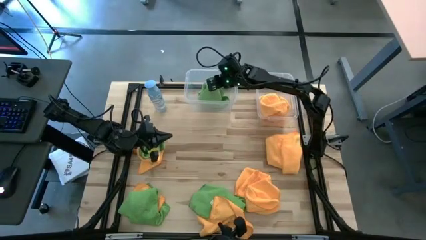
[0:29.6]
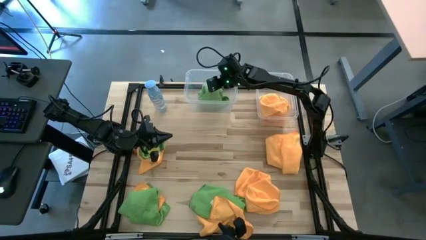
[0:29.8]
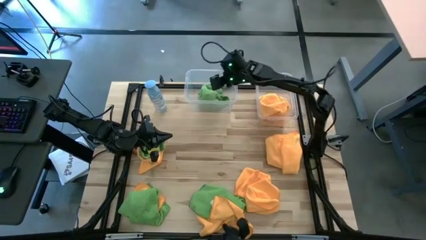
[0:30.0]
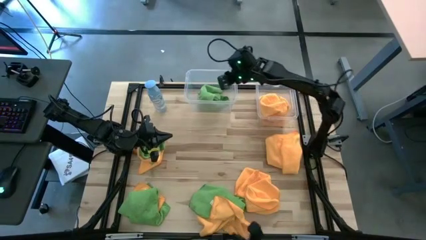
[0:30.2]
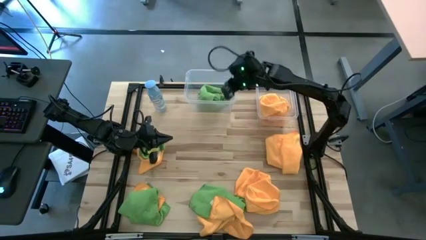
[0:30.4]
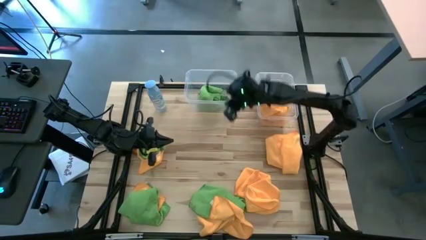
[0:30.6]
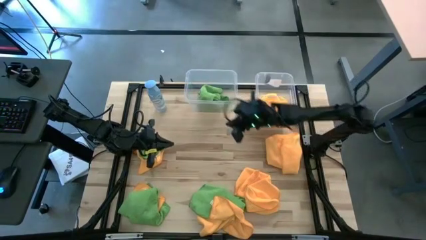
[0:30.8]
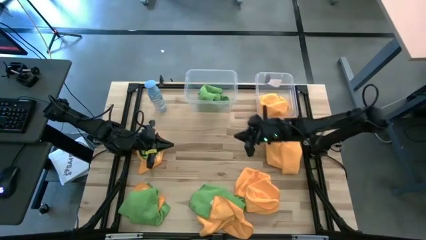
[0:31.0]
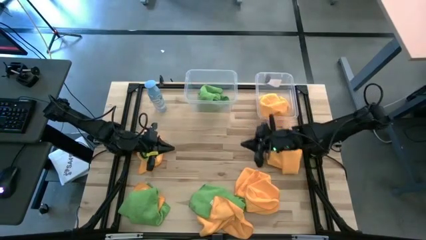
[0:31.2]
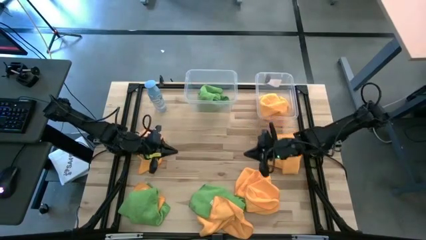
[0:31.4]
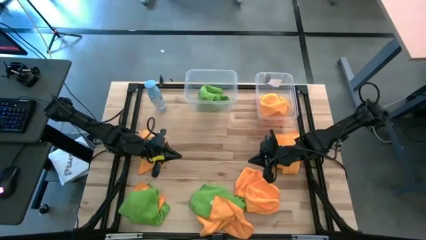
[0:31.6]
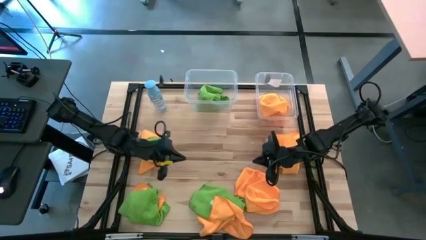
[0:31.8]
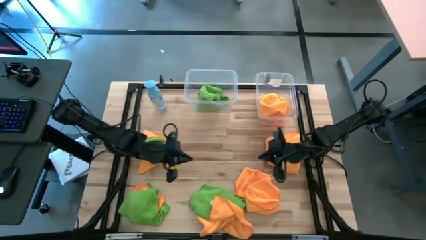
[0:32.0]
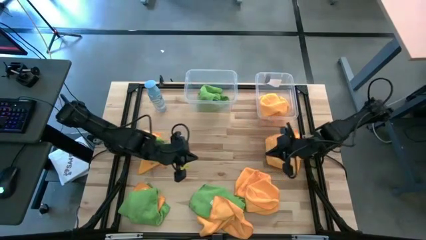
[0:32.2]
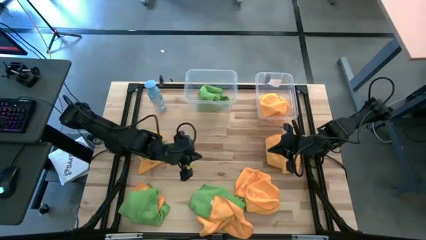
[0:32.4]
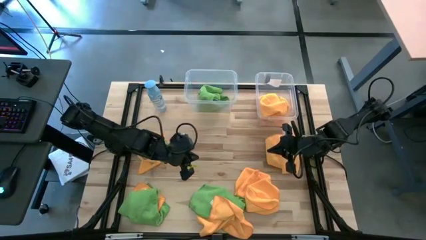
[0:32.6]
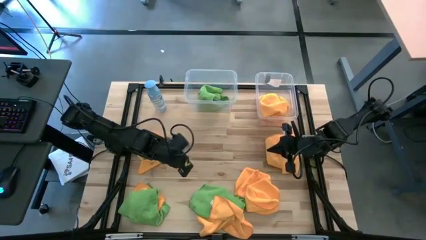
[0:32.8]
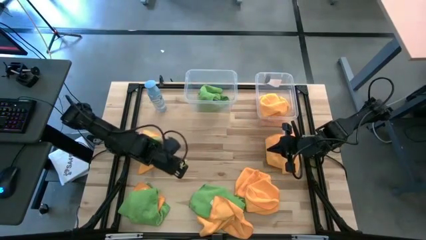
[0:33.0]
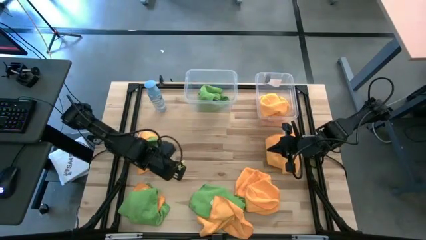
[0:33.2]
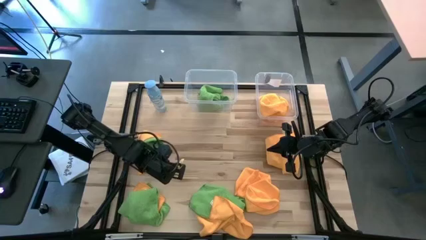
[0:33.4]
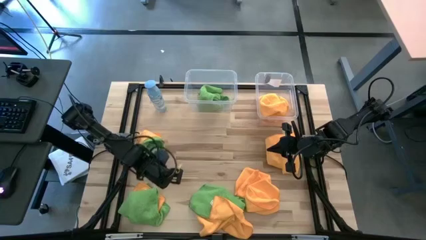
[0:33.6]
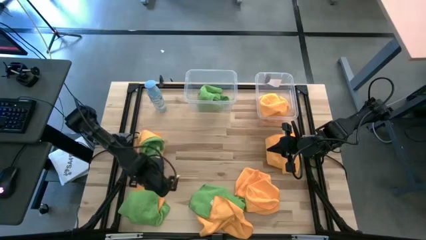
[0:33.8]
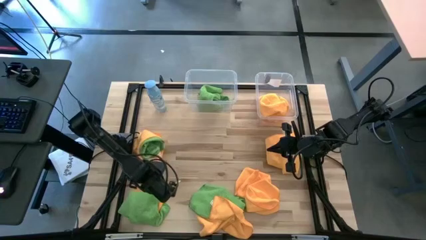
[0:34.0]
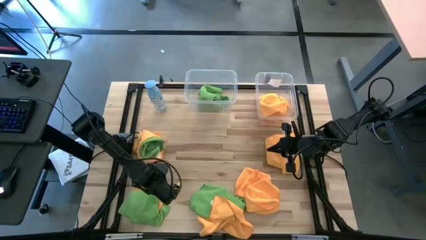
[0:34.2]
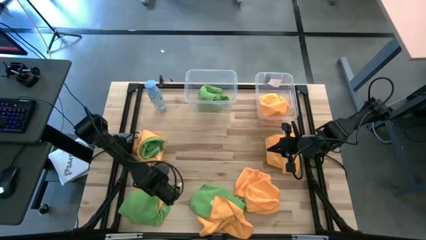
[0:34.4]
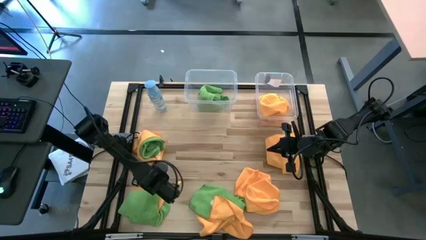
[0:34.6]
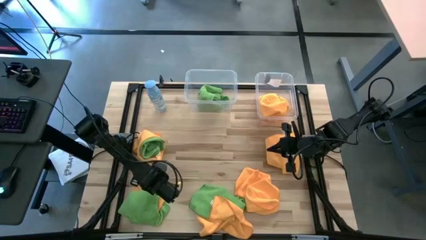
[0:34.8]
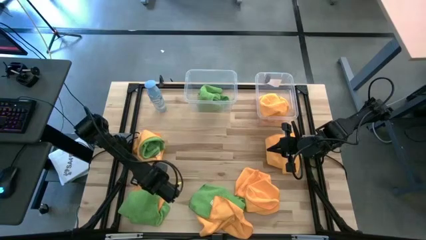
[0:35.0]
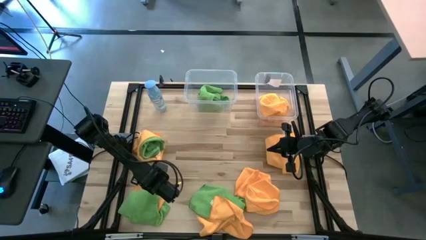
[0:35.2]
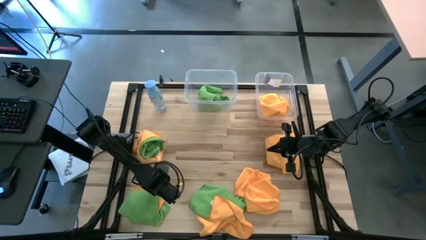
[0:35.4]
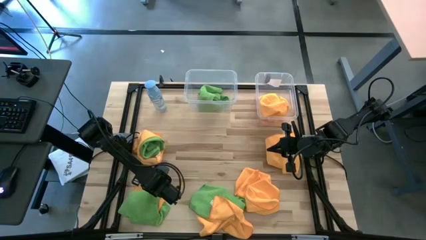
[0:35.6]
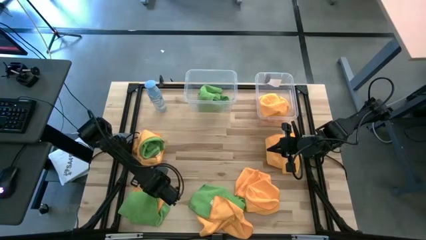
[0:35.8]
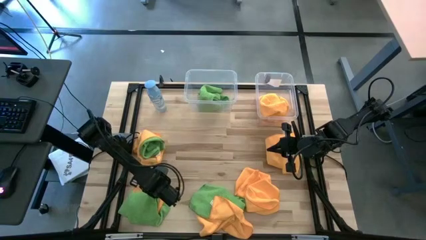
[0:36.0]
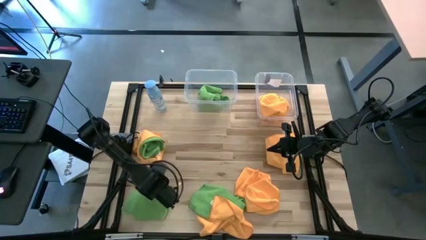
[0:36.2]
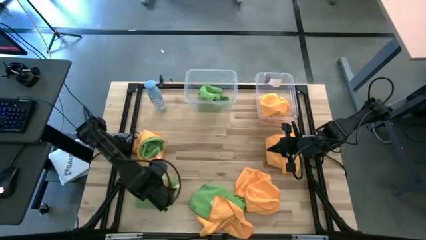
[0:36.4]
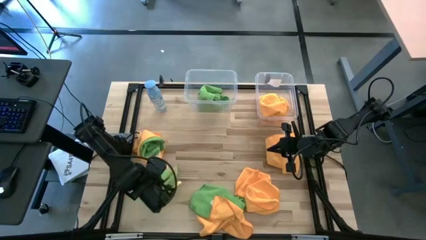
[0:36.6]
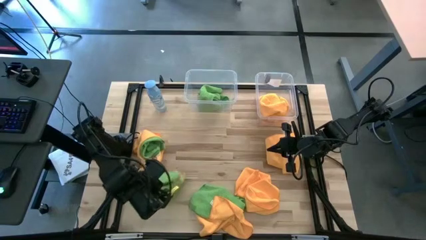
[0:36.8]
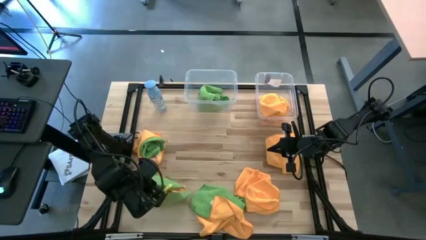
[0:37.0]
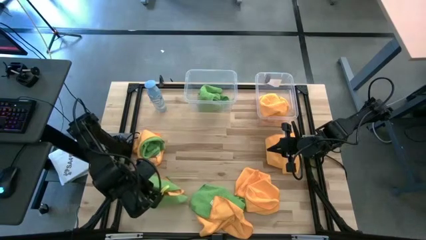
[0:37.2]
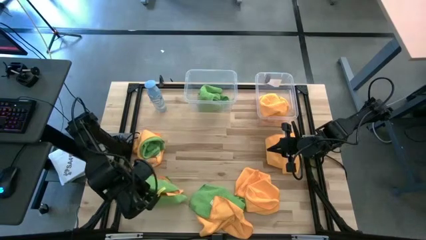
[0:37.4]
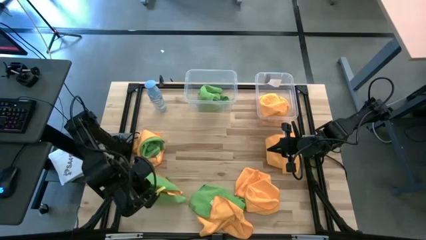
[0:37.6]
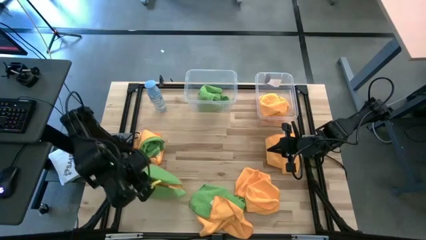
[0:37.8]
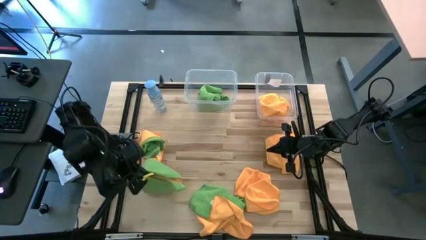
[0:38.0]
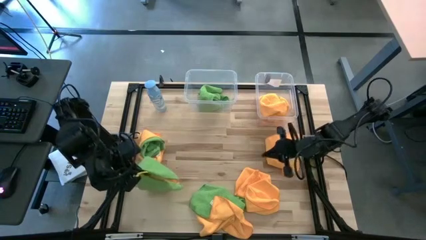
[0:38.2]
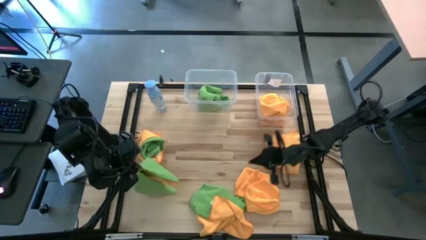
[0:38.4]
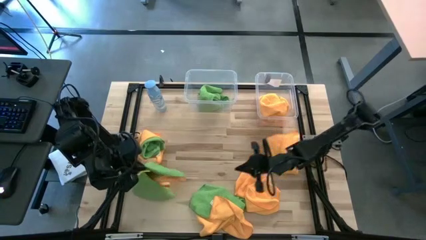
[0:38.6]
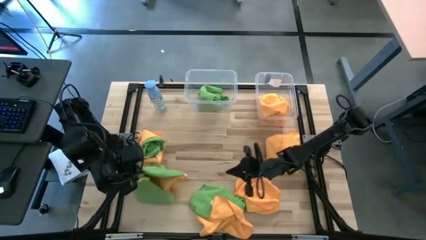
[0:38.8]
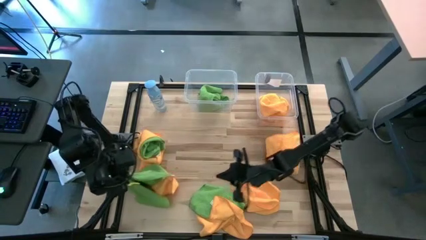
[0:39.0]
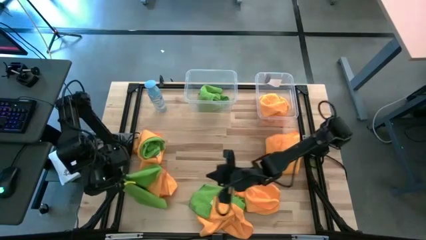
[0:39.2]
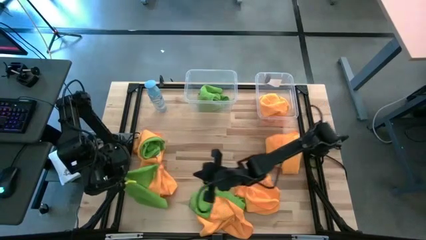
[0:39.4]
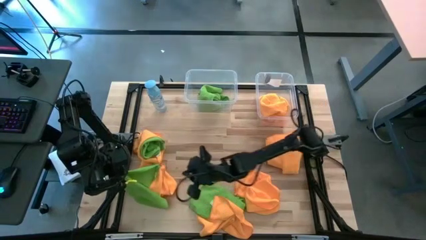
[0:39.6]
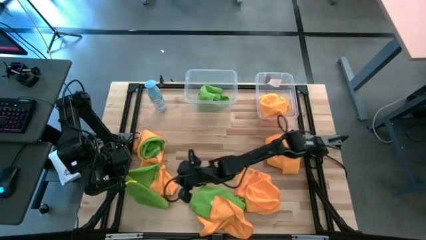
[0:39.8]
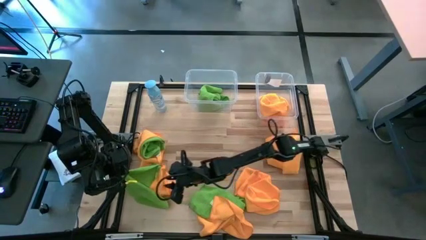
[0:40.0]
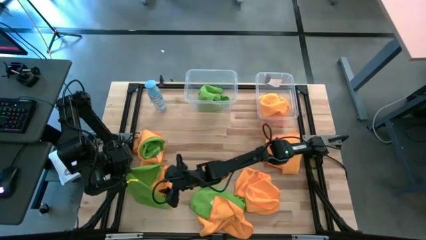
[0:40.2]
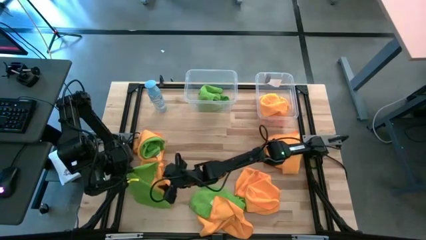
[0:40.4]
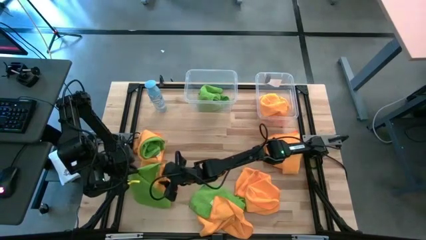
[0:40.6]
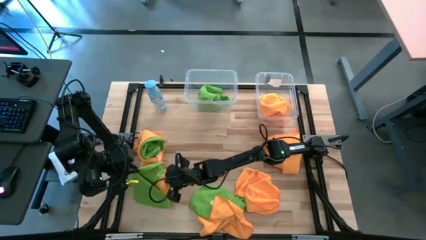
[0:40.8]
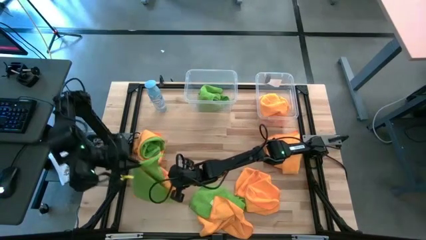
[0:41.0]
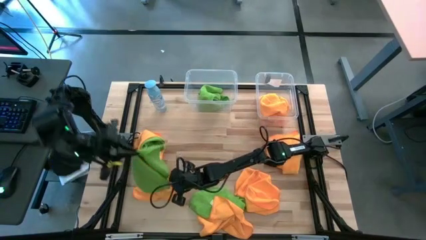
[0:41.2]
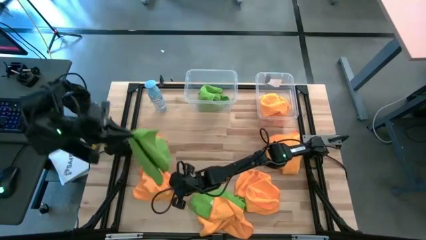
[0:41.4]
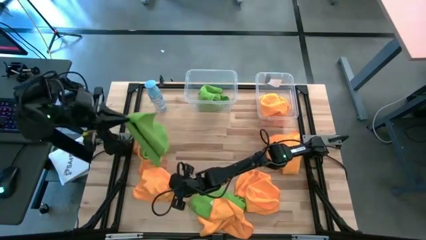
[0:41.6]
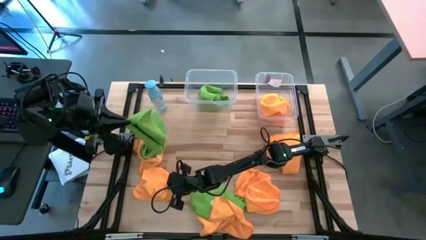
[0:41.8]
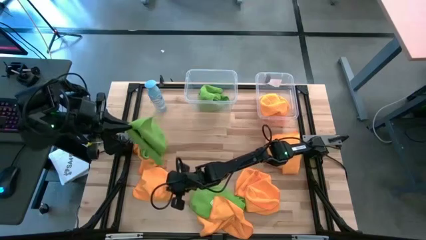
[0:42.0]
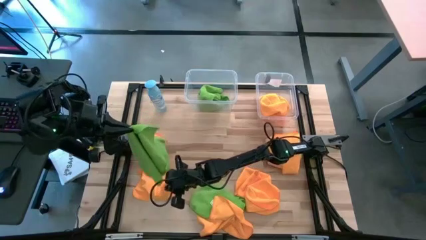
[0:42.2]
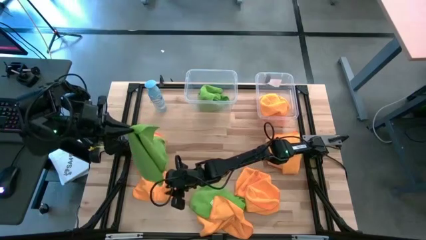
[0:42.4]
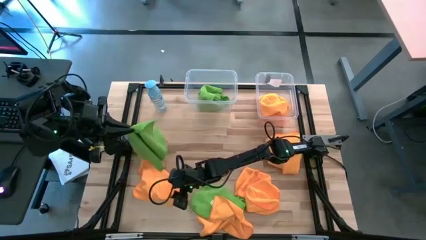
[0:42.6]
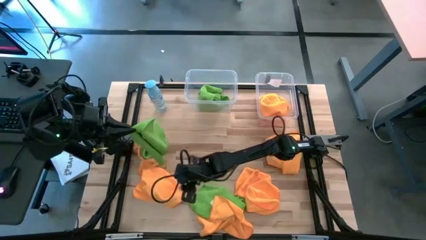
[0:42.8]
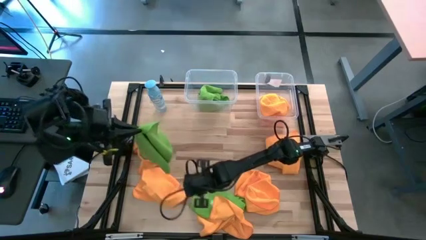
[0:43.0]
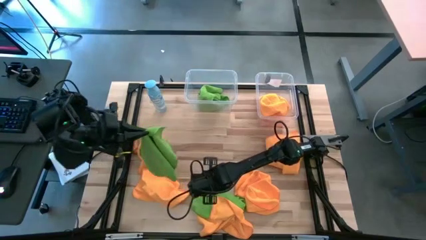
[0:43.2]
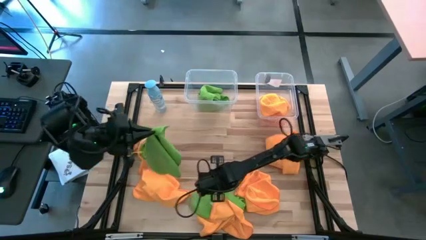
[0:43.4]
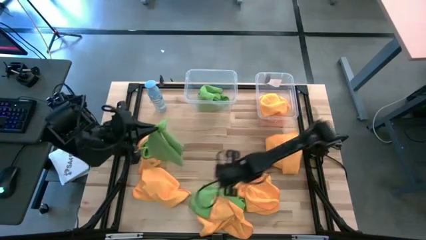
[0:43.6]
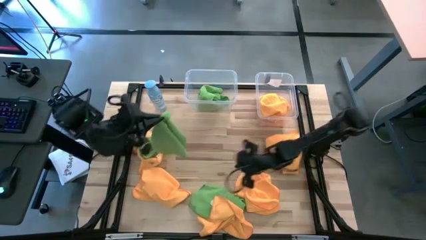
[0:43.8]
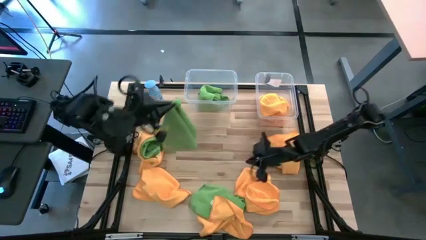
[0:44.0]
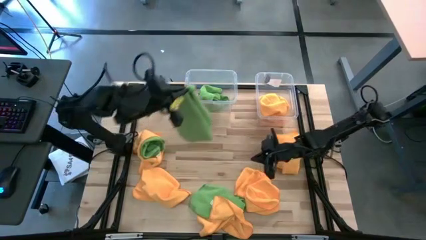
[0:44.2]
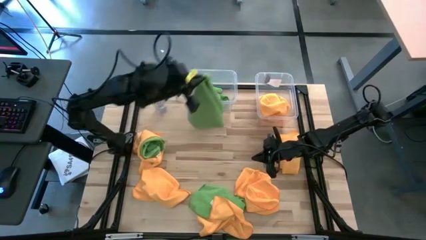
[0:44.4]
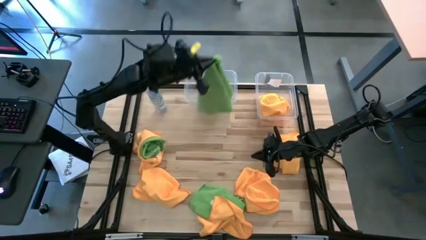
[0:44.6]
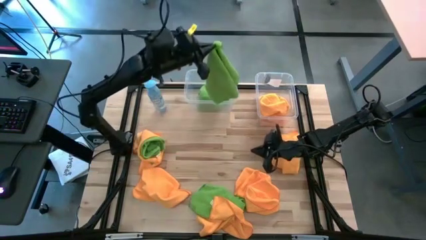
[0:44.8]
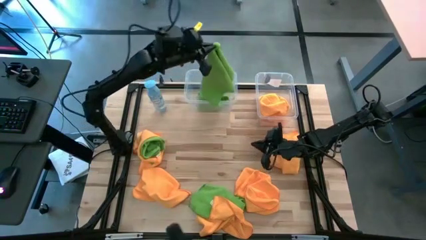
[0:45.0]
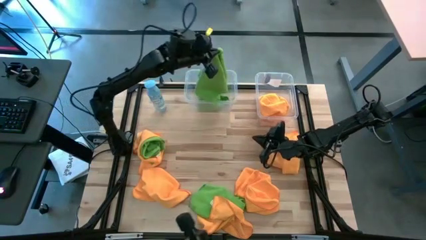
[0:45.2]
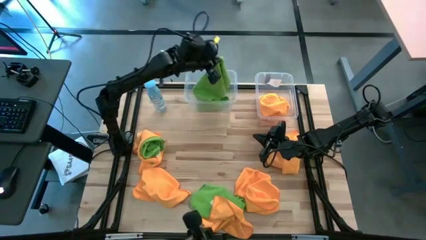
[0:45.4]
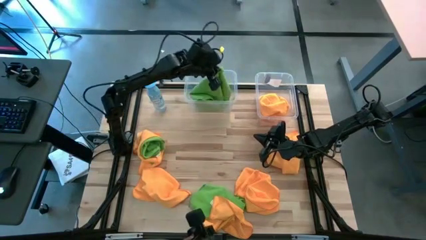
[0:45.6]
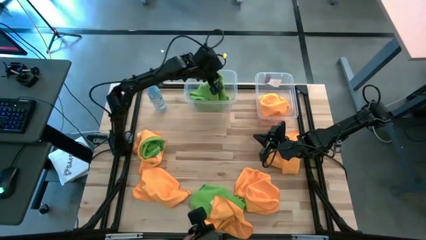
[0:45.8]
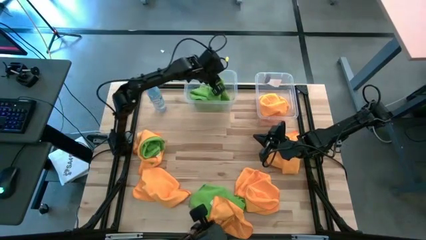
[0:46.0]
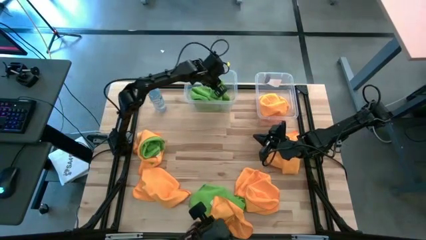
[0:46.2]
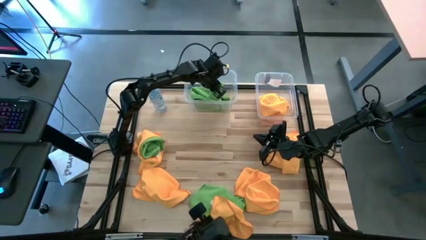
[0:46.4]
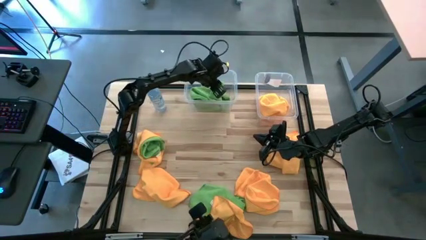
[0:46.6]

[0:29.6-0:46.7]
Task: Sort microfiber towel by color & place in baskets
Put the green towel into the left transparent bin
